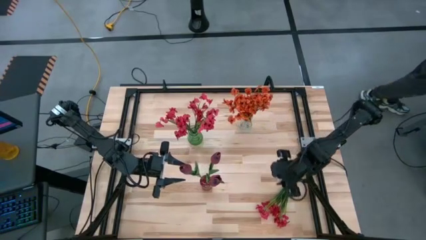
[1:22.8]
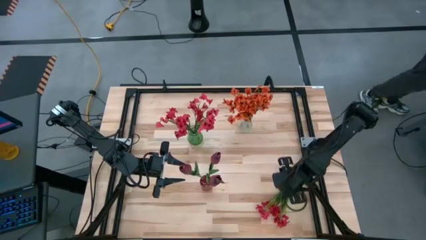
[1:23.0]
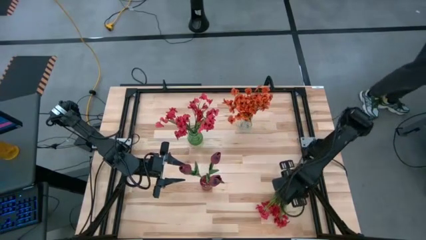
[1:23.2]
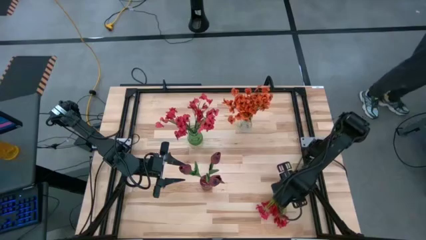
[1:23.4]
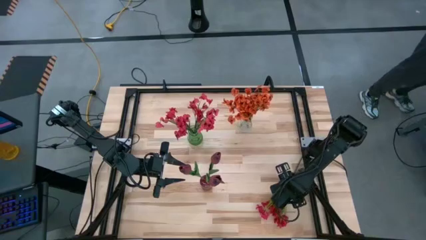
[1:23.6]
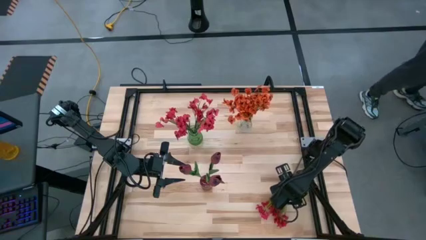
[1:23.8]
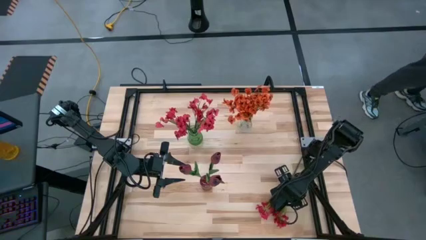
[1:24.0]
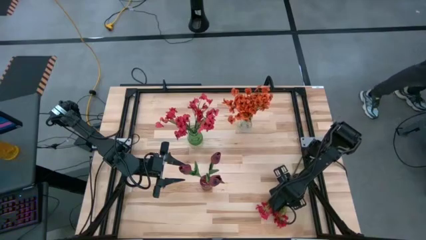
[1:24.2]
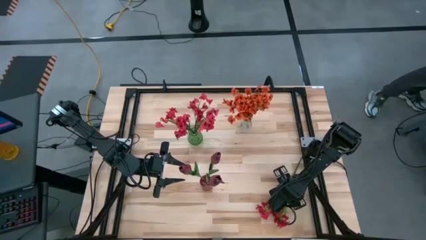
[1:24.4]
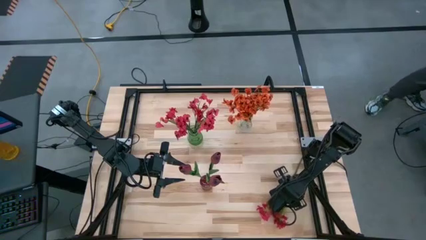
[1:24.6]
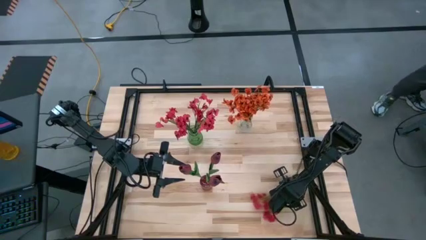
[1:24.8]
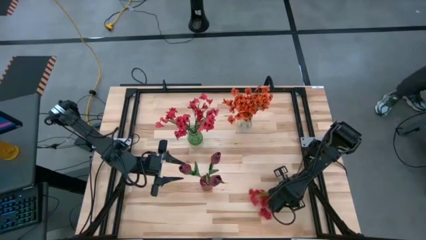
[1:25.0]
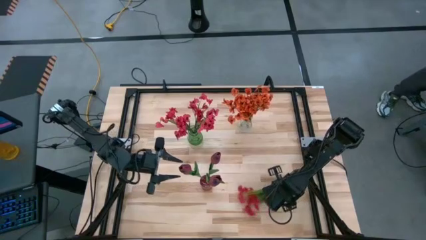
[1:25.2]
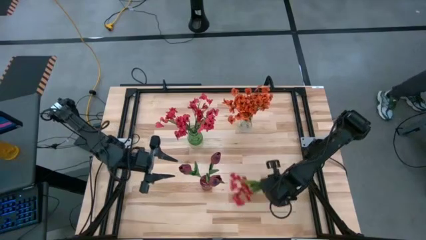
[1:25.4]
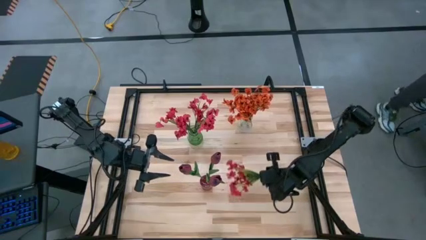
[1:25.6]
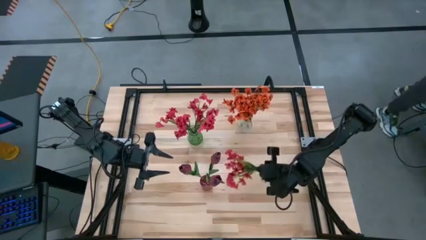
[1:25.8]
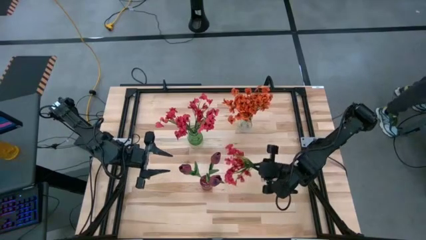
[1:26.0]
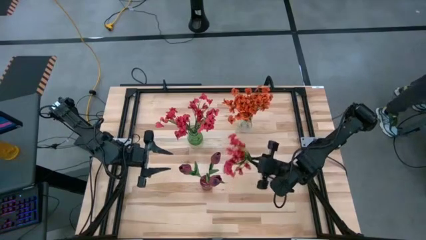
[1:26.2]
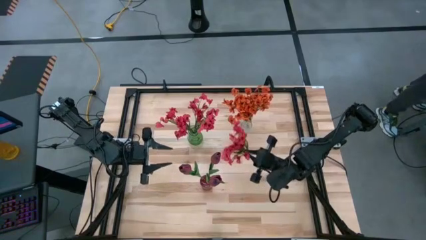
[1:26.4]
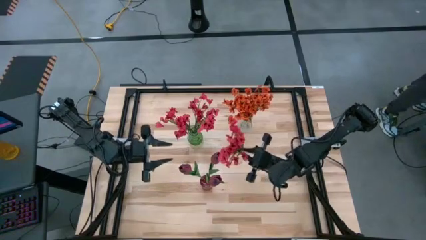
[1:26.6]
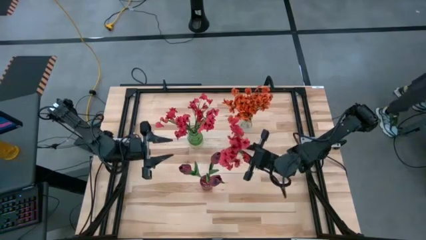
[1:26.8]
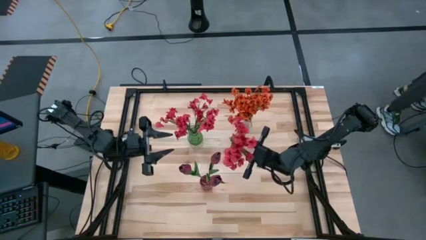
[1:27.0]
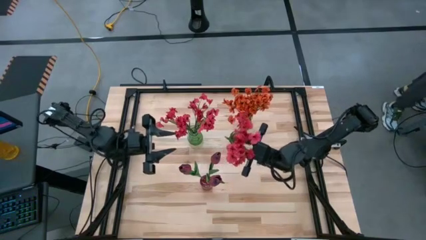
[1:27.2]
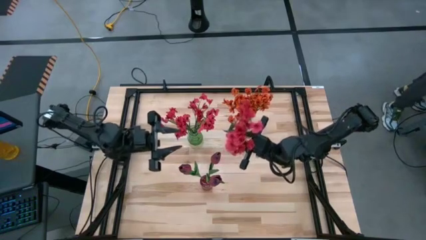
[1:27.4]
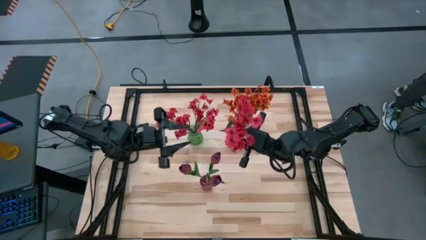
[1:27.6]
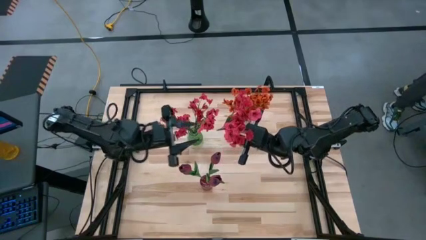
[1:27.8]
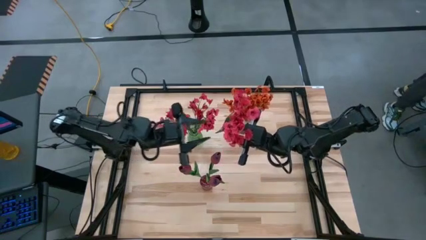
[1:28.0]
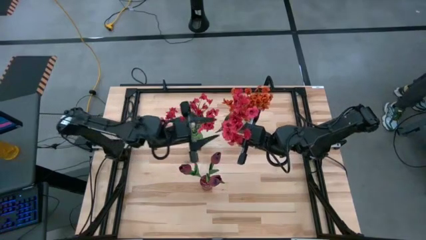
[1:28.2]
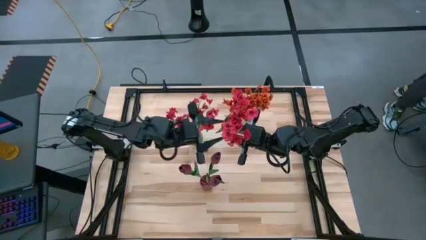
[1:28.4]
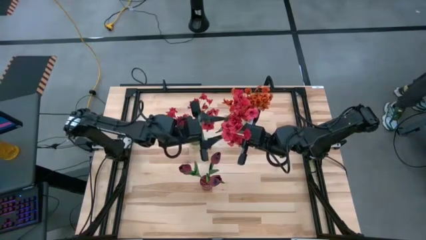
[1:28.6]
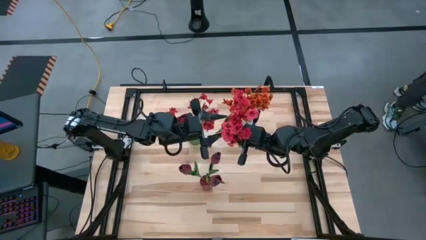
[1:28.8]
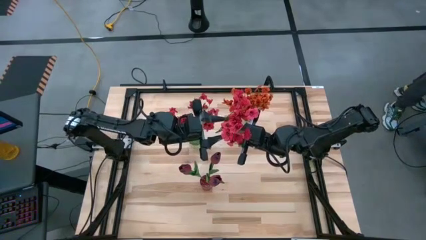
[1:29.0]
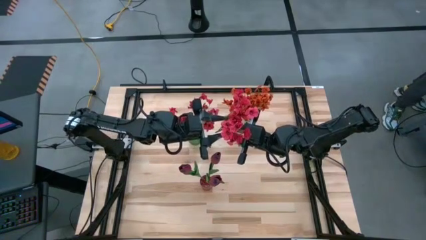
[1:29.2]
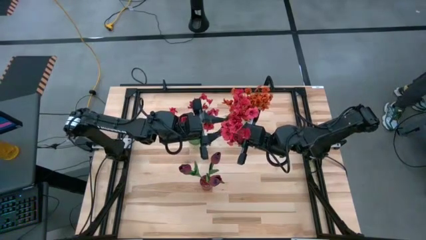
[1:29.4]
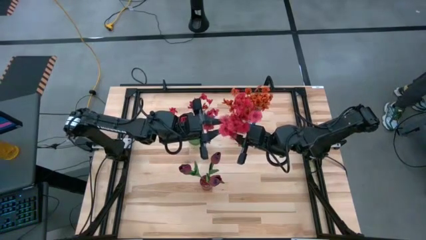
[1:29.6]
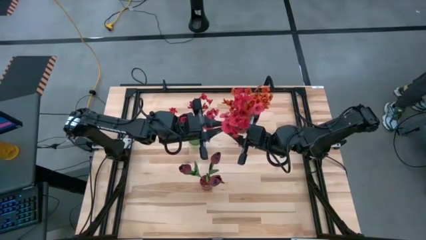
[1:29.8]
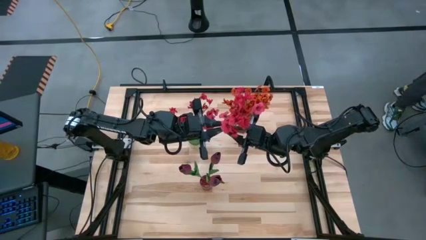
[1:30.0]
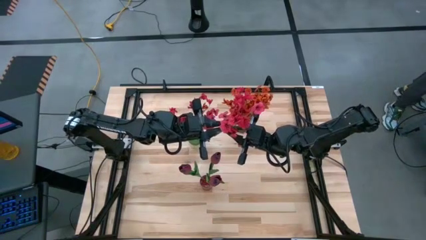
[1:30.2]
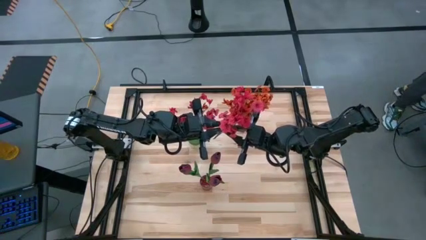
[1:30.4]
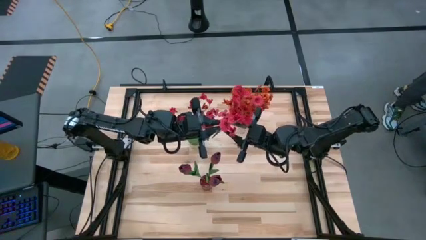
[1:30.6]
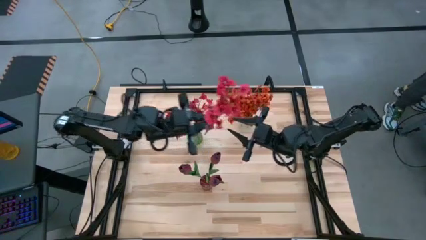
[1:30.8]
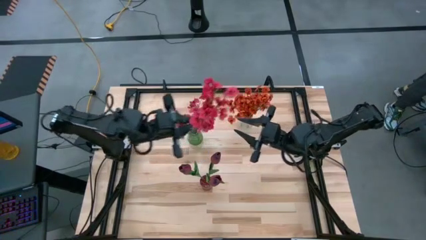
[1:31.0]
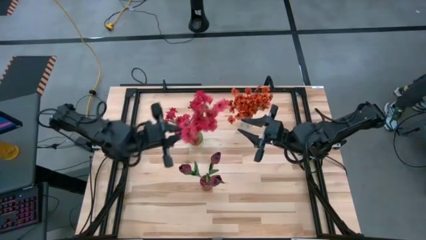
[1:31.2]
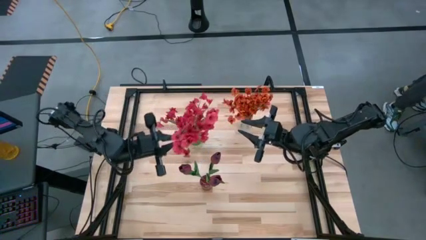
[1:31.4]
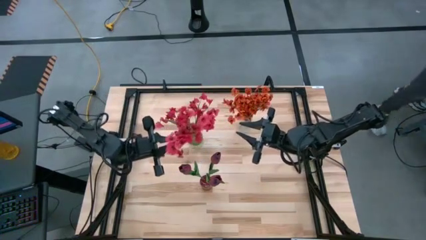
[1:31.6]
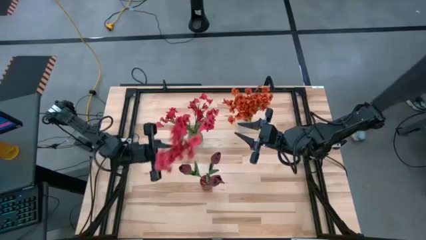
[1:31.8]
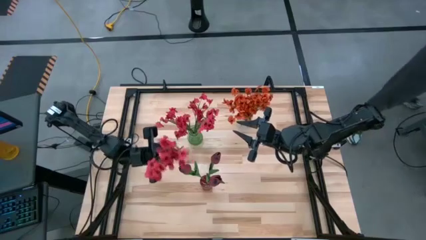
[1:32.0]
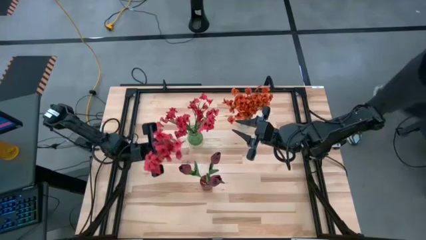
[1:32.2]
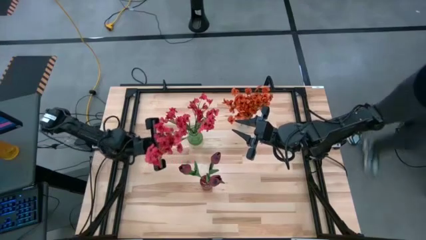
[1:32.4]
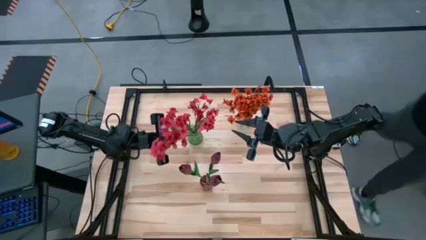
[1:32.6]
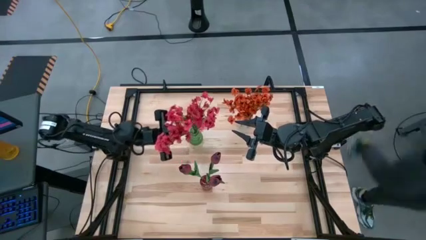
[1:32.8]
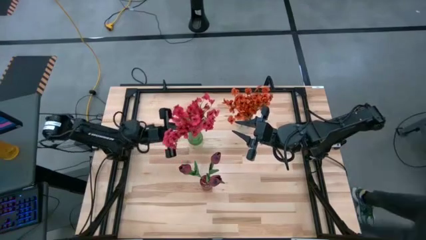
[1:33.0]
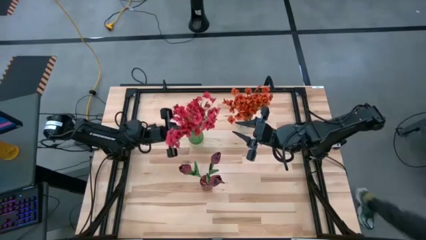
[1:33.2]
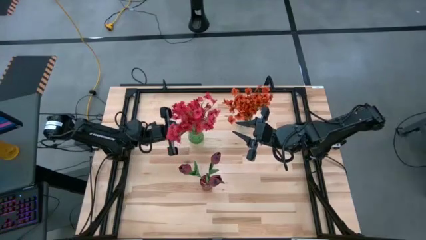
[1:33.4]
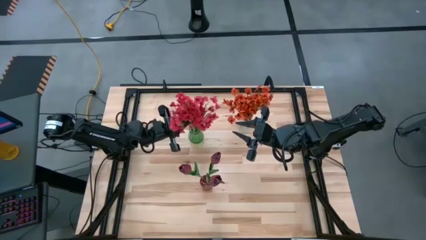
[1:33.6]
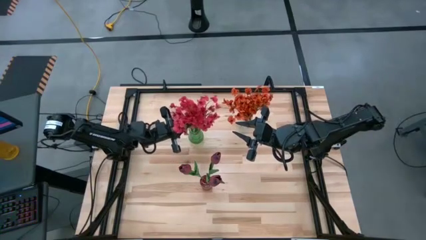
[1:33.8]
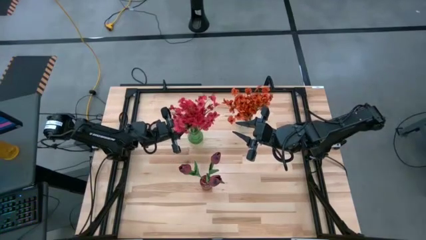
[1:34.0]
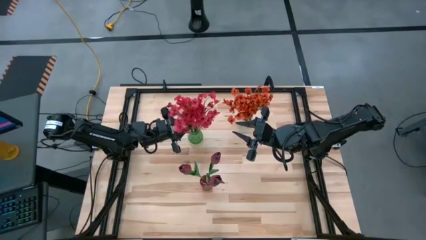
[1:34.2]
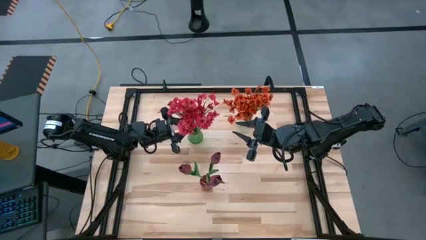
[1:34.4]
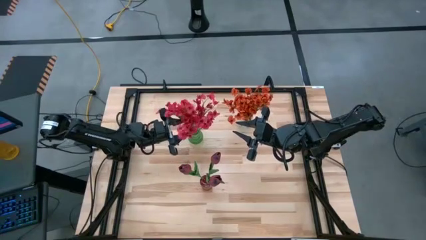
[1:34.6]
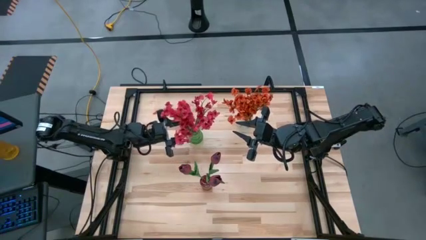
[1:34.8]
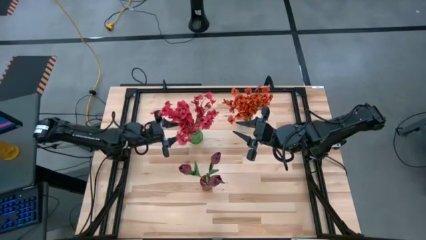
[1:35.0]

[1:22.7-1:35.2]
Task: Sort flowers into vase by color
Put the pink flowers into the green vase

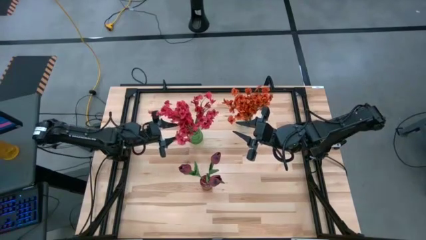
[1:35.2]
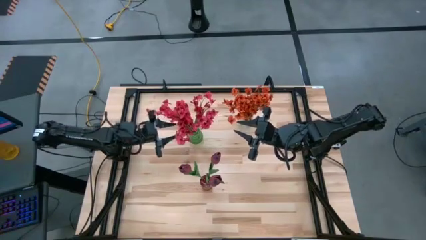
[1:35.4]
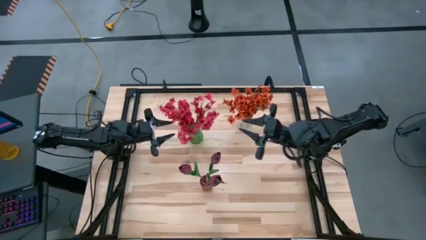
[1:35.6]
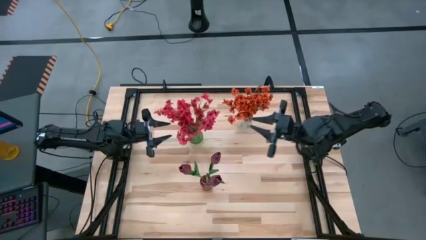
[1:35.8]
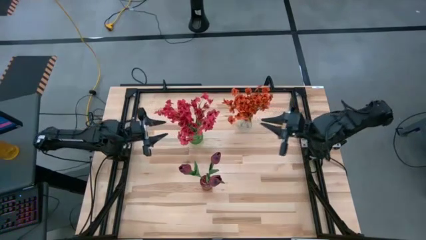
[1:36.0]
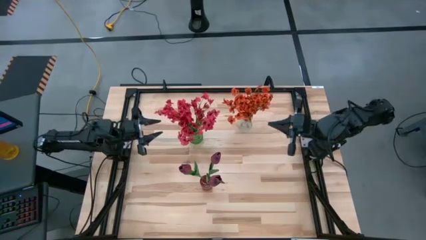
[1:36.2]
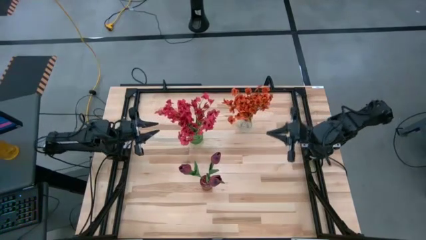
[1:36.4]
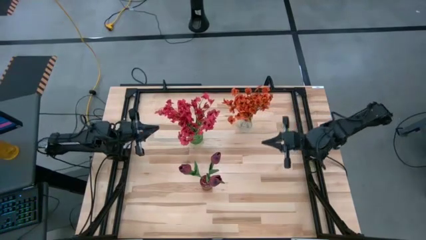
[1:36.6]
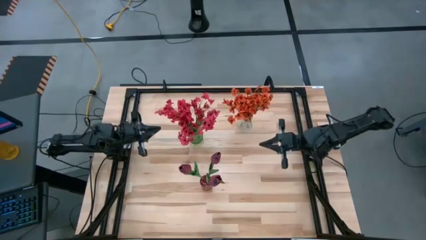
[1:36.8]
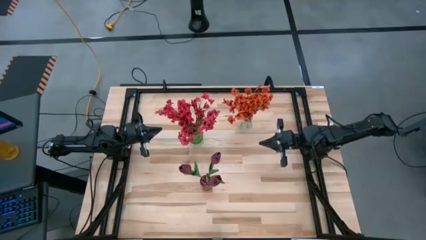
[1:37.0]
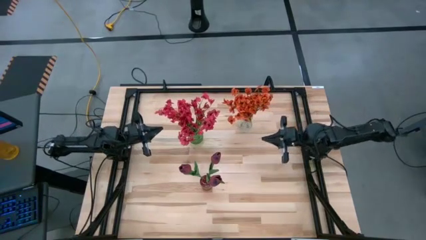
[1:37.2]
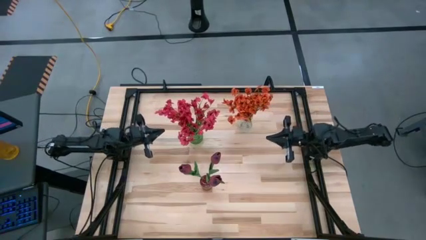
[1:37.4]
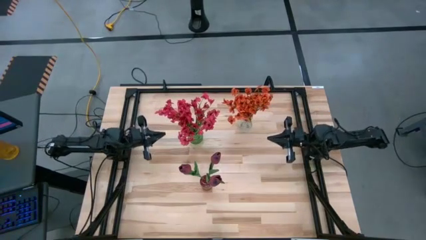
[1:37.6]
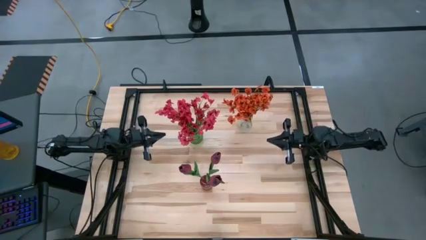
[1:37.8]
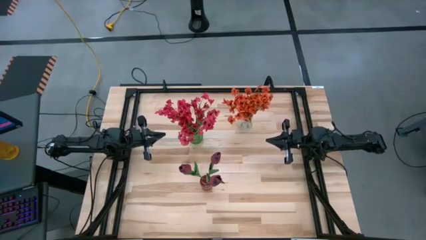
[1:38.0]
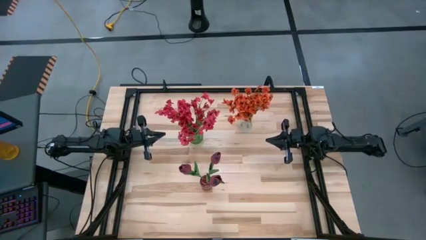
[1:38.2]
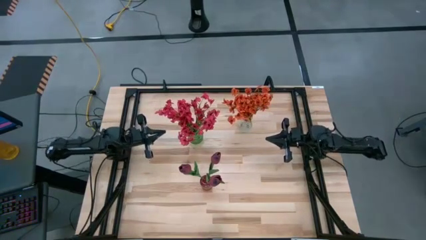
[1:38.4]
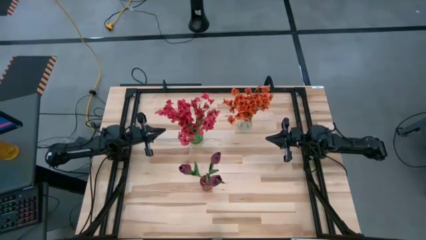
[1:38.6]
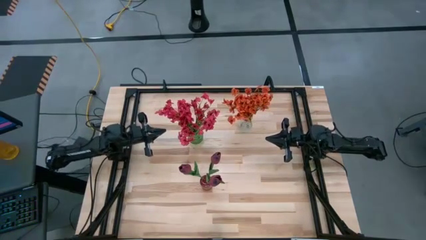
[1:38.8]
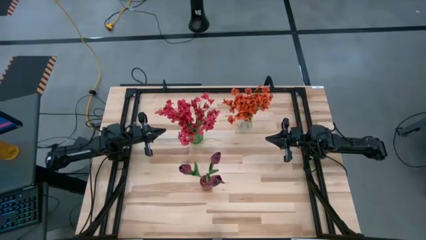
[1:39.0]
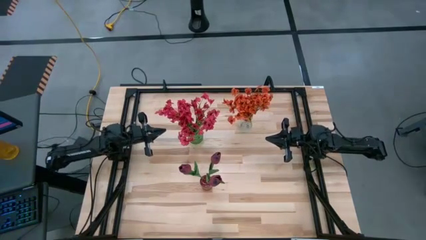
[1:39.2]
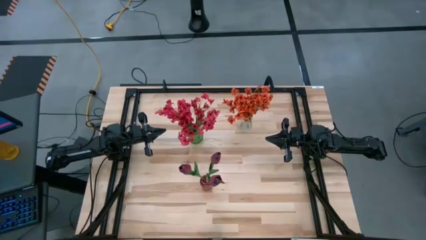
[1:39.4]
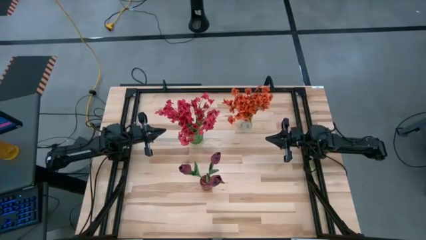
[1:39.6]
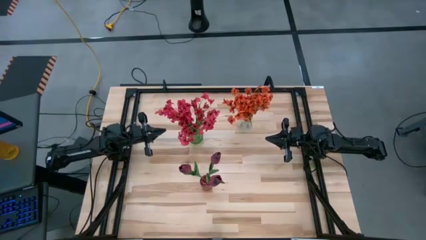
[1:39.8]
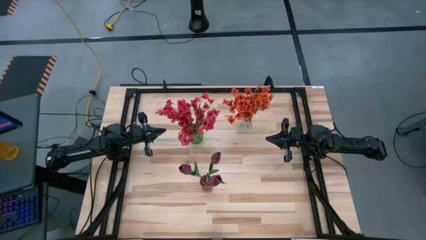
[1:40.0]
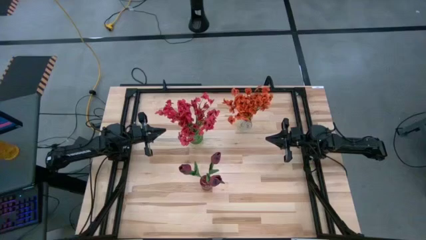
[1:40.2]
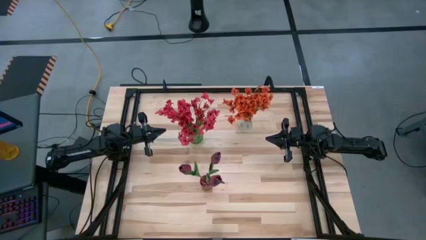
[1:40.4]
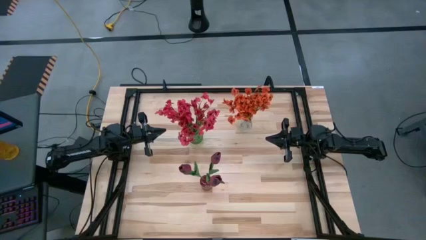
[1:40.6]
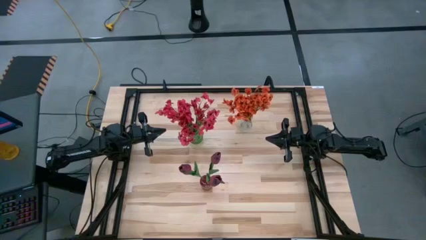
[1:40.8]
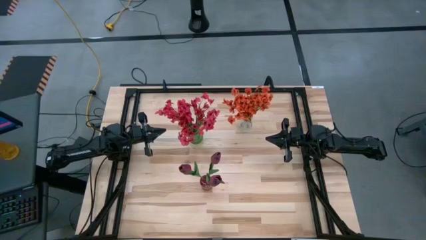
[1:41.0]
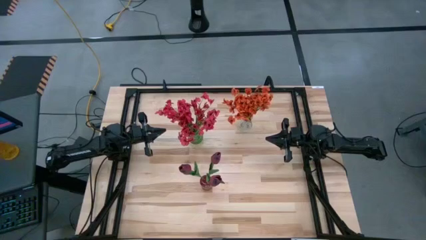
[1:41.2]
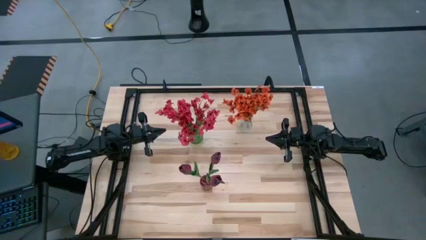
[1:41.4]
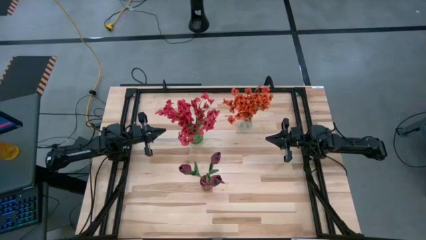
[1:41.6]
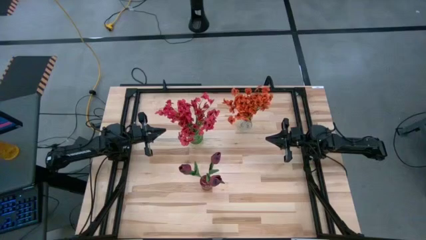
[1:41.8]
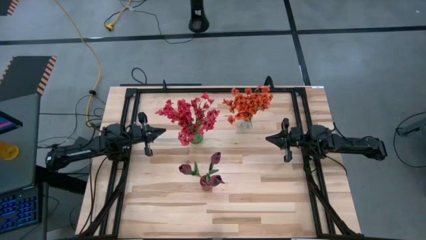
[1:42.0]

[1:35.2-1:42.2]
Return to Home Position
